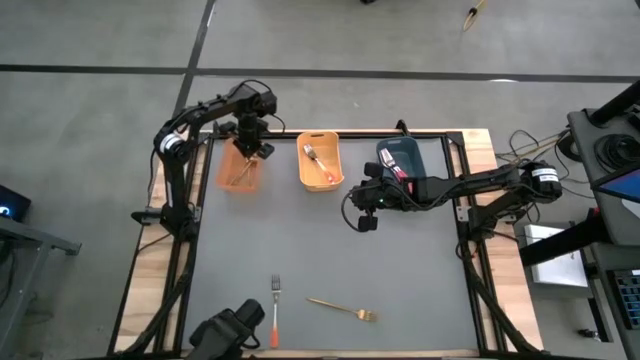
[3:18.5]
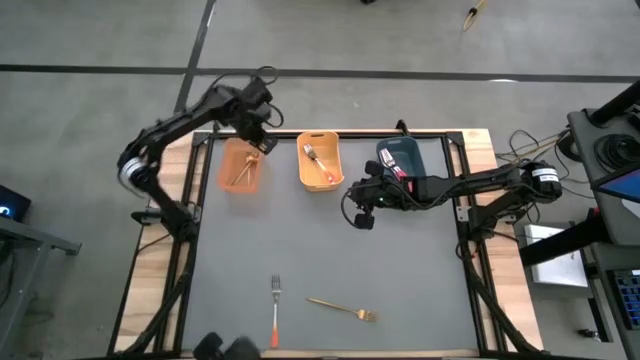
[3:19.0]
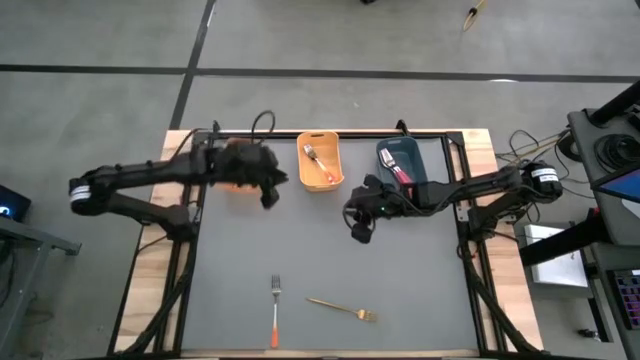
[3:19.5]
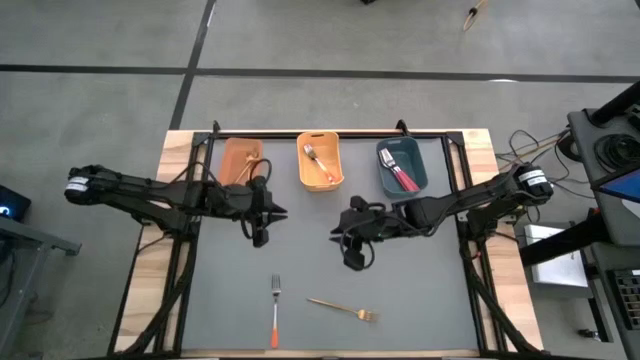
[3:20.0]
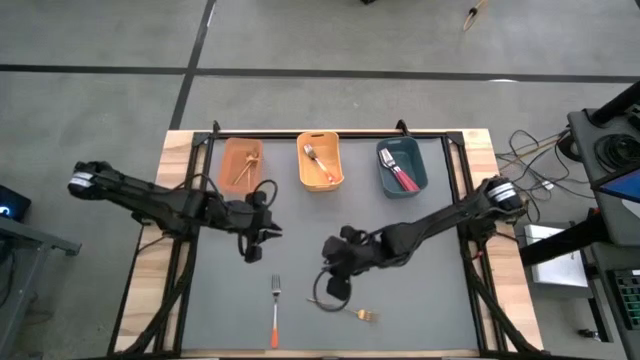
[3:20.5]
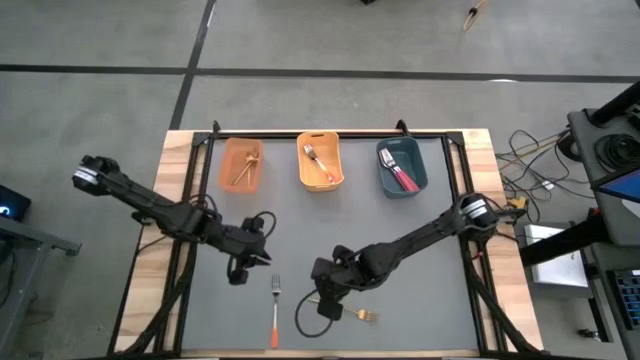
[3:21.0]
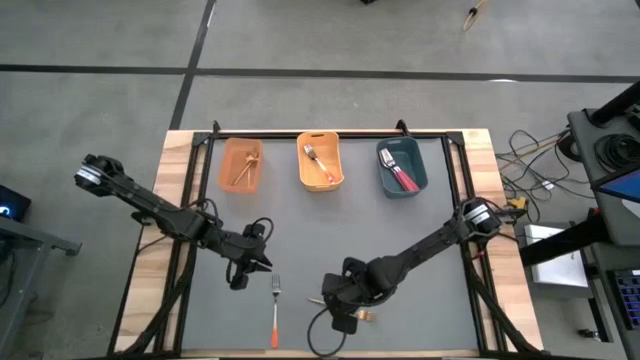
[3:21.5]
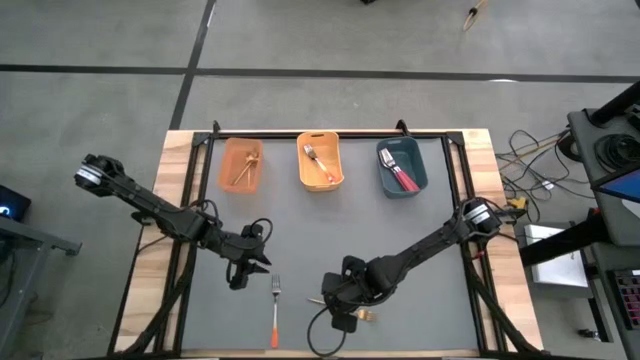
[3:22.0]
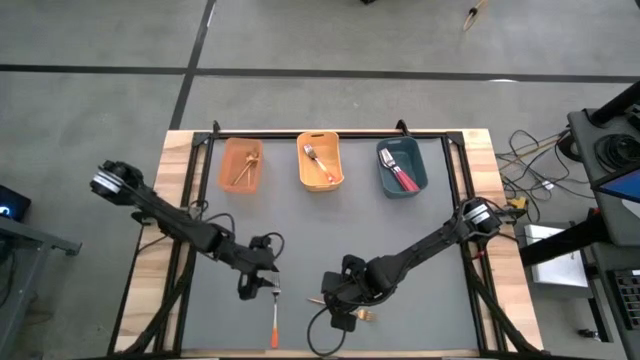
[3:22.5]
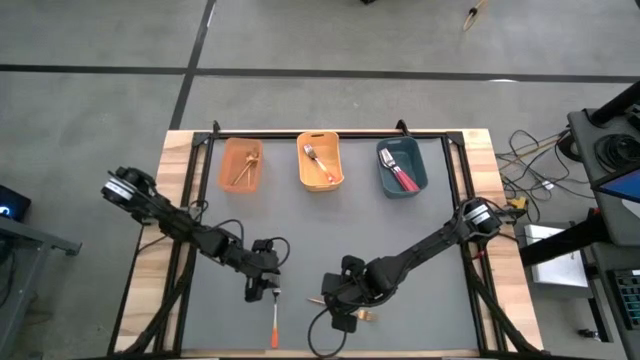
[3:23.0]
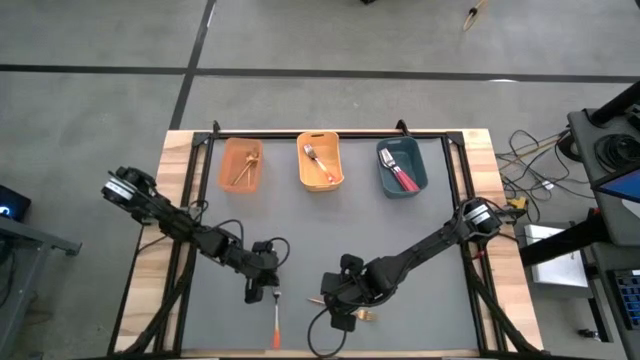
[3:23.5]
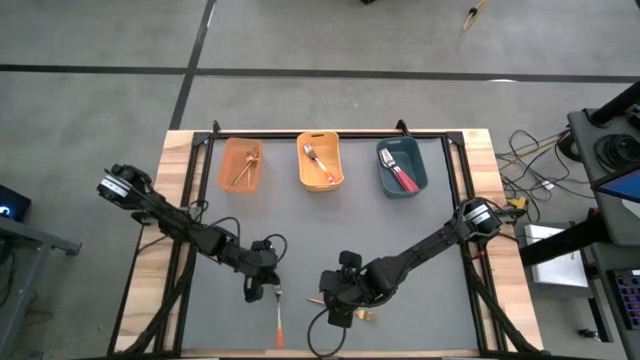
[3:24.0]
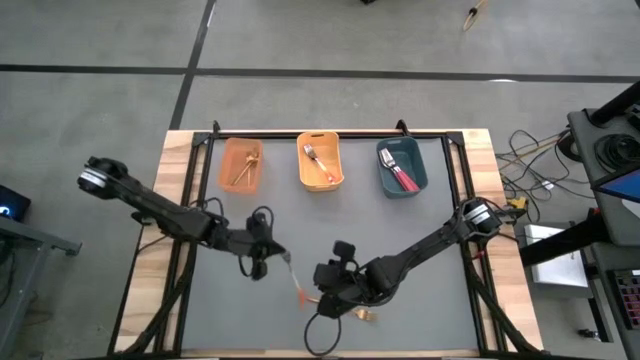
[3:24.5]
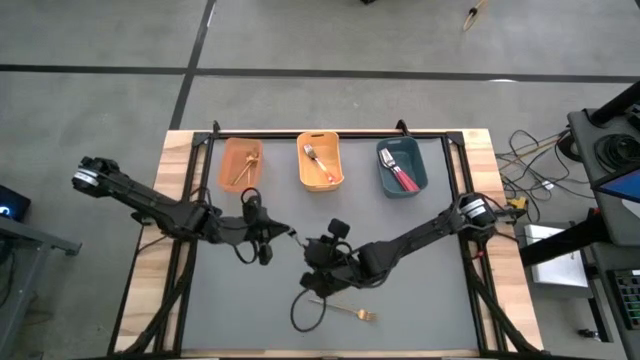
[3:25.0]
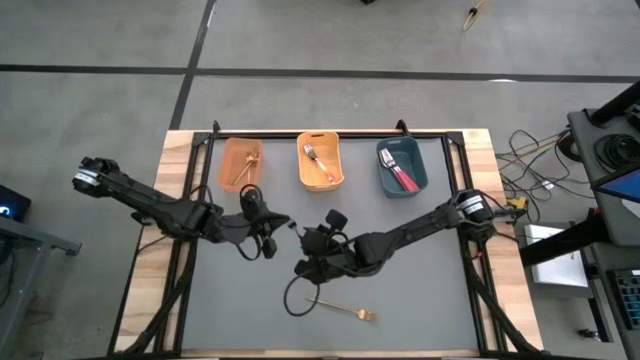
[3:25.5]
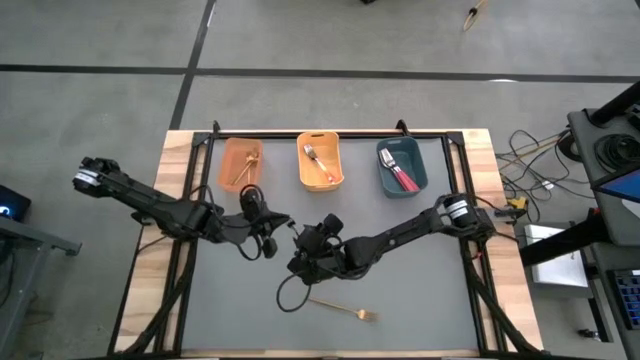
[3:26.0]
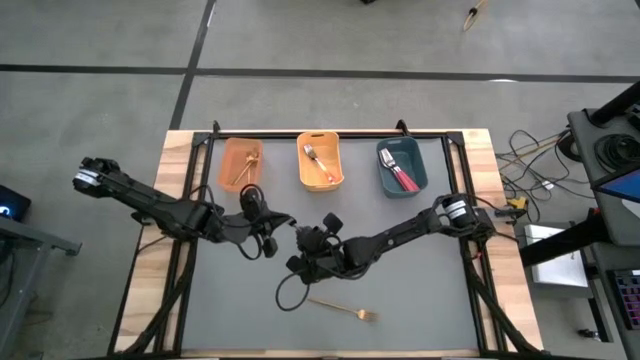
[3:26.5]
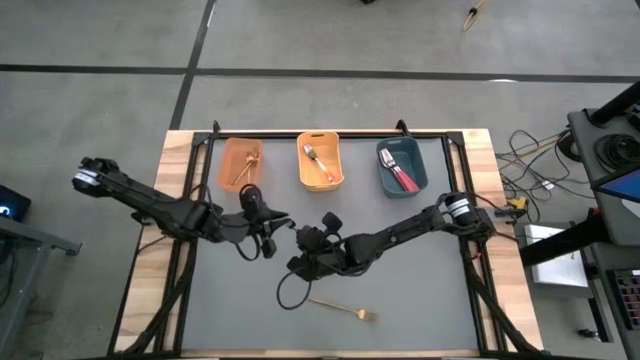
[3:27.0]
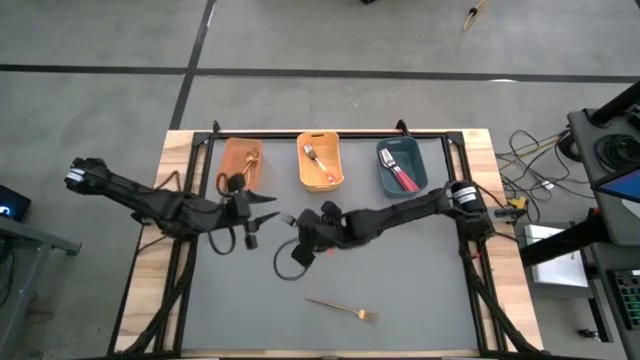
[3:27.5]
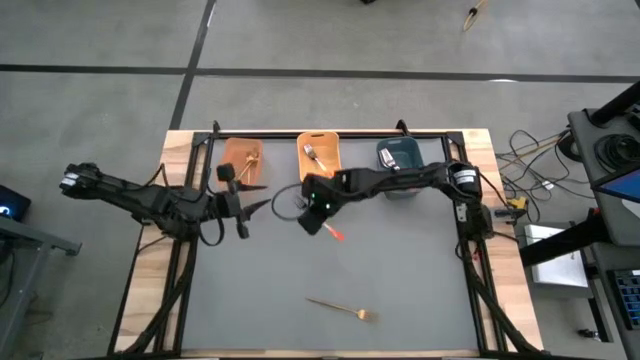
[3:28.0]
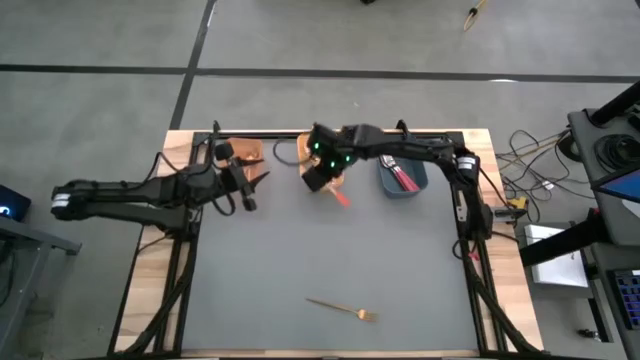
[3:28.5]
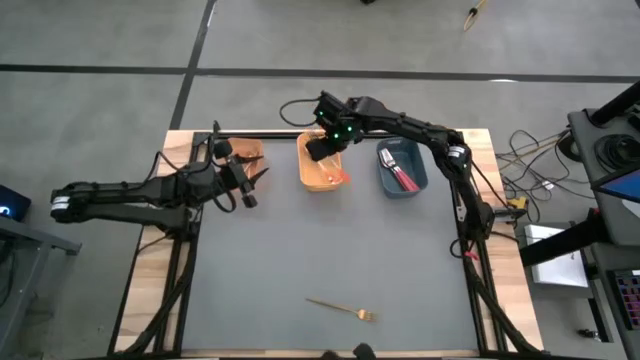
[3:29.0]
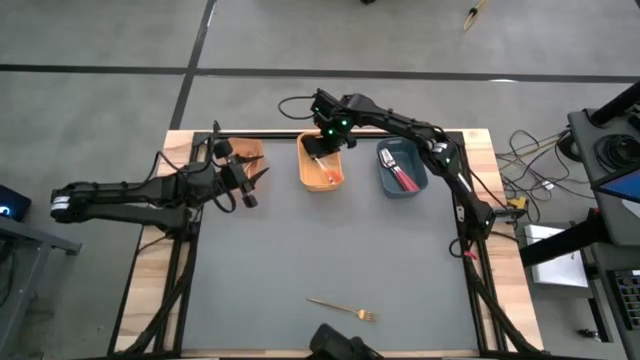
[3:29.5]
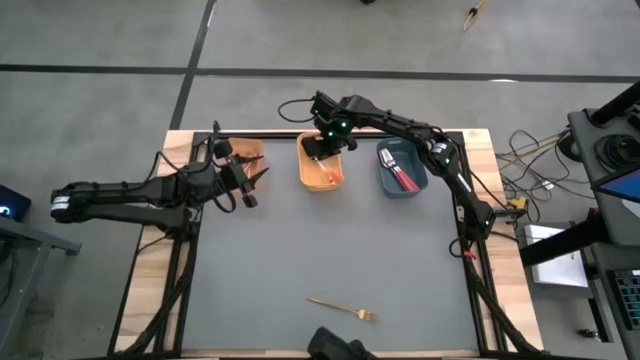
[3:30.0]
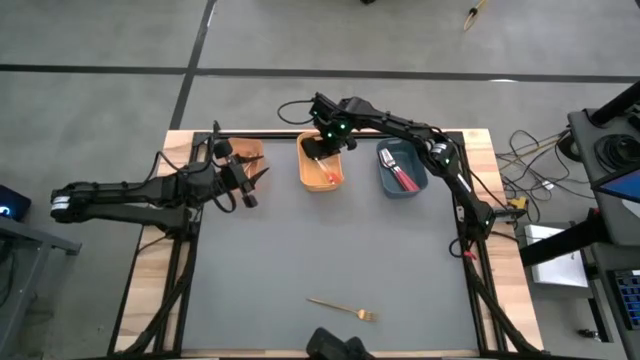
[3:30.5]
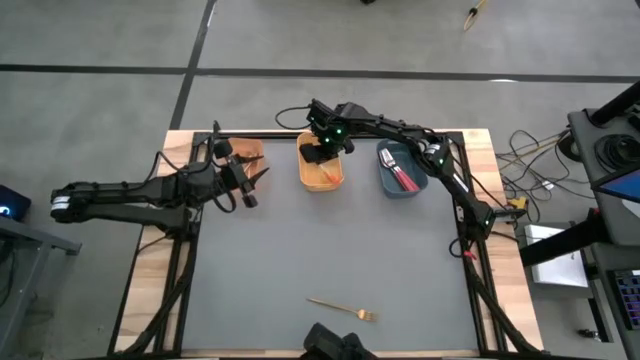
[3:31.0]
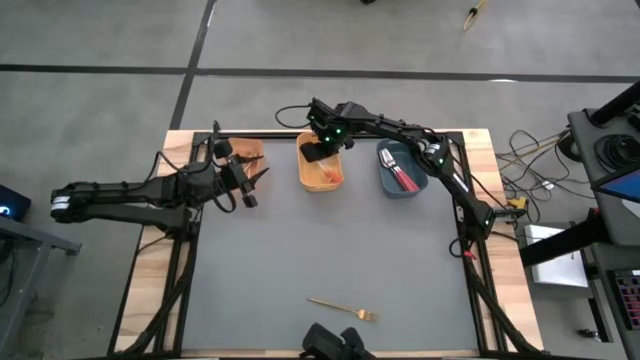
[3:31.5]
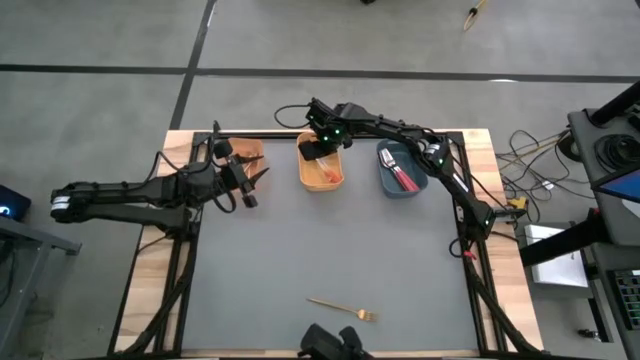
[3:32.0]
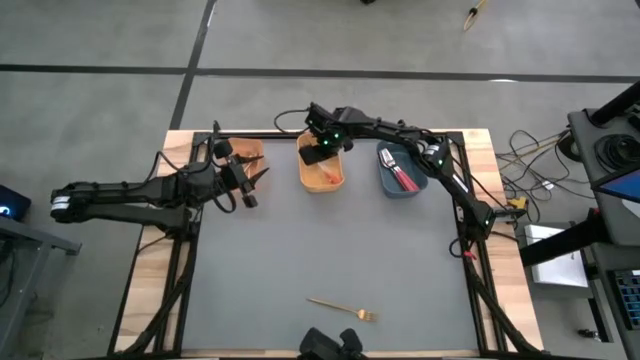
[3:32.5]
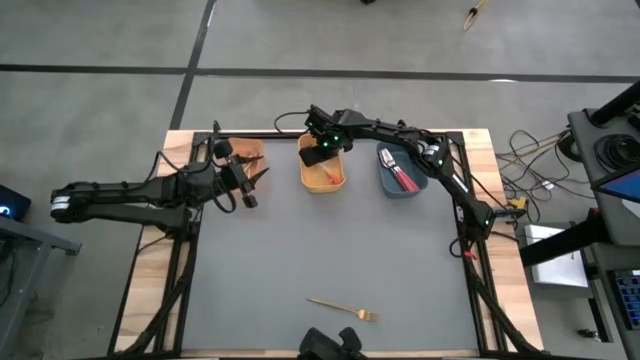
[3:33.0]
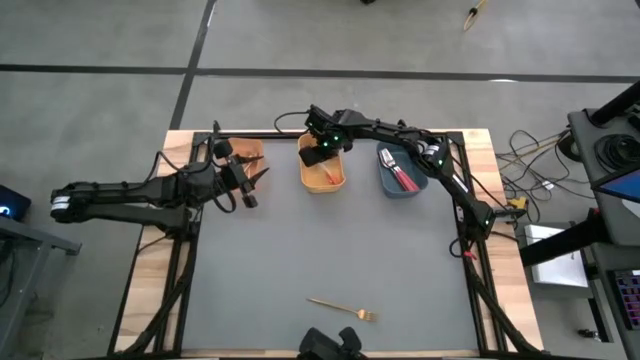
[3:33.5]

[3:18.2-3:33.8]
Task: Sort silverware by color (type)
Put the orange fork into the yellow bin

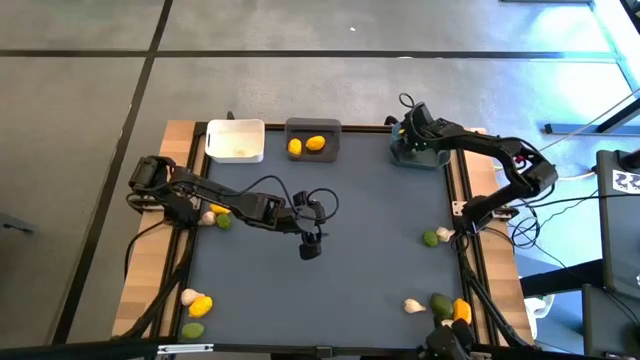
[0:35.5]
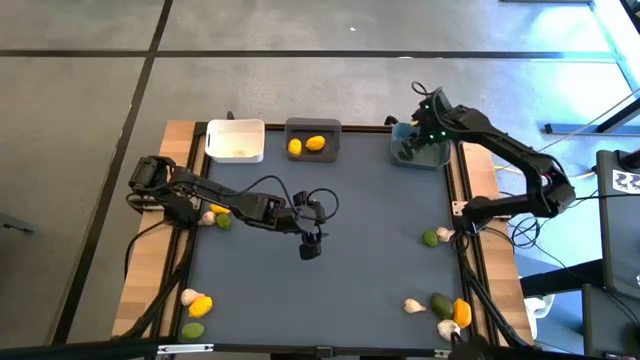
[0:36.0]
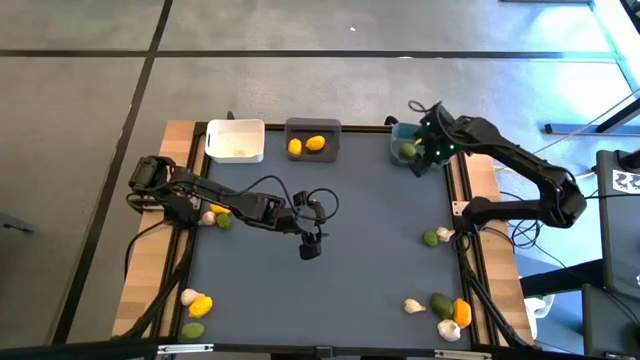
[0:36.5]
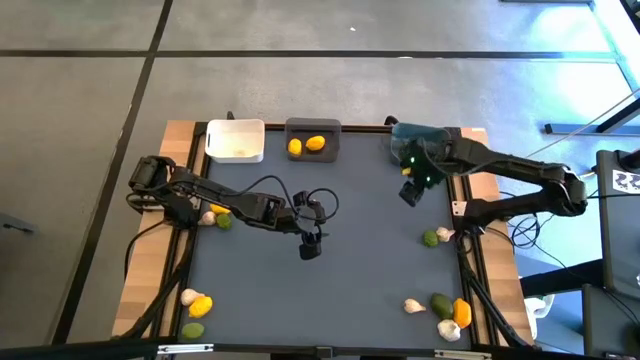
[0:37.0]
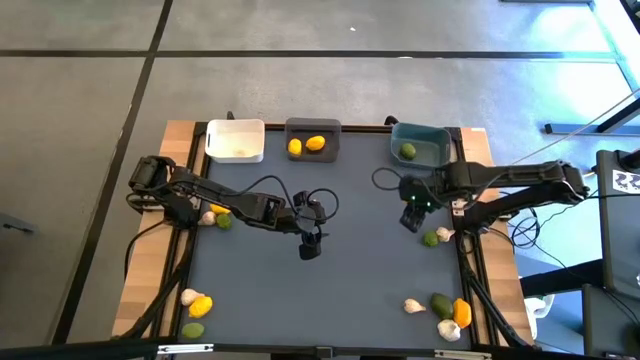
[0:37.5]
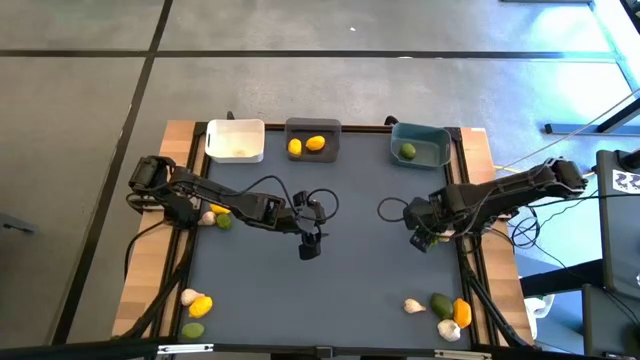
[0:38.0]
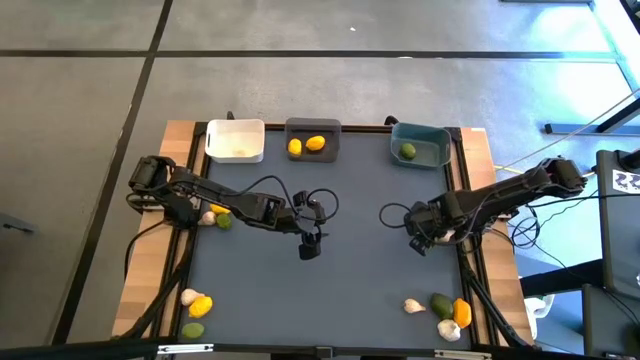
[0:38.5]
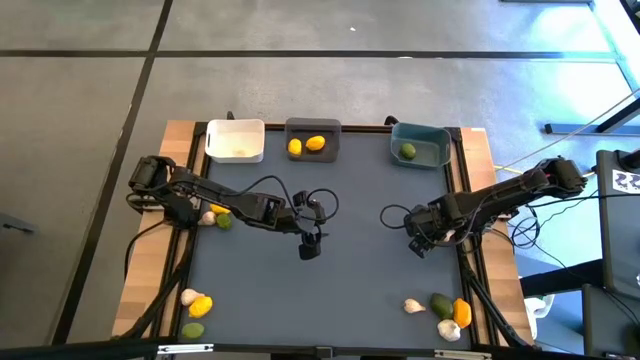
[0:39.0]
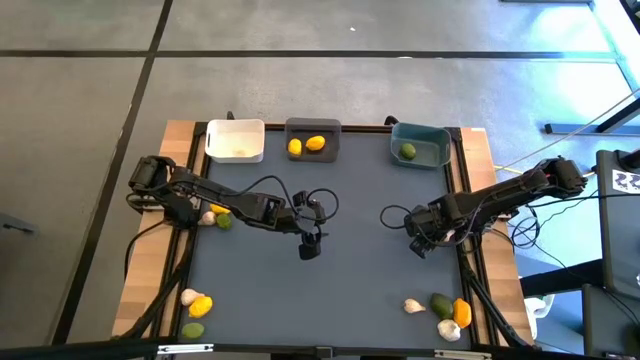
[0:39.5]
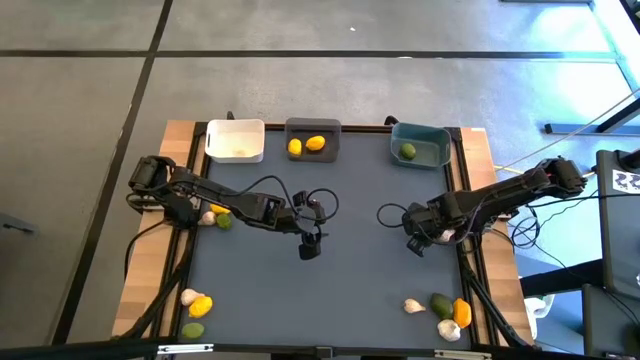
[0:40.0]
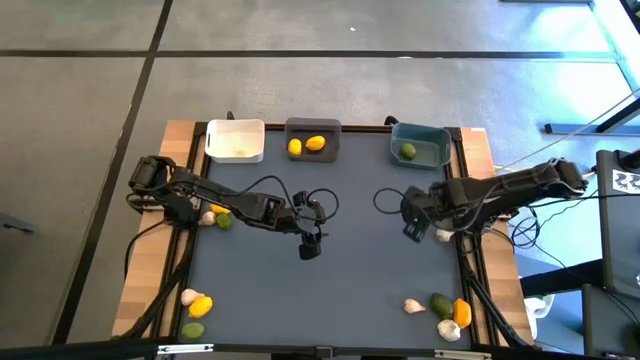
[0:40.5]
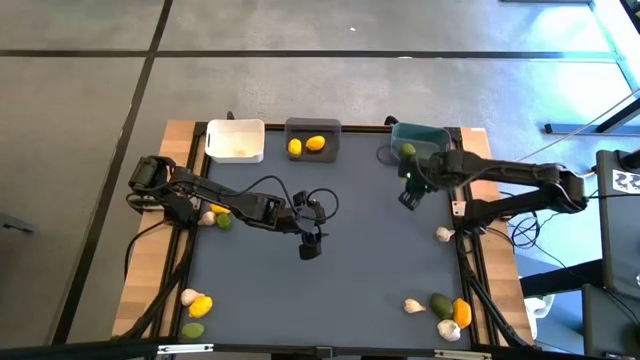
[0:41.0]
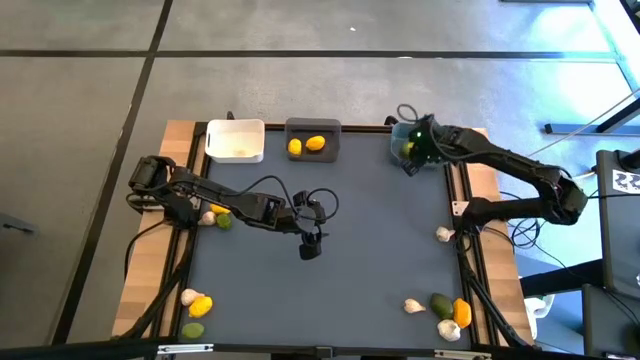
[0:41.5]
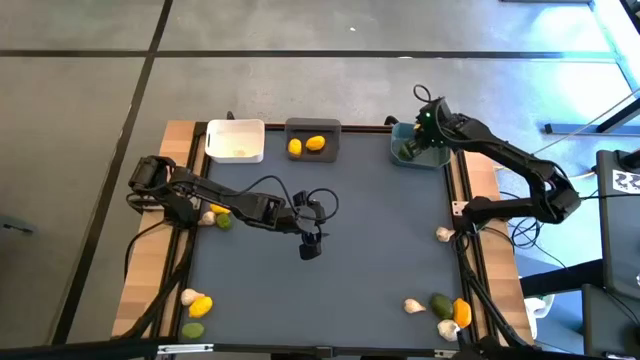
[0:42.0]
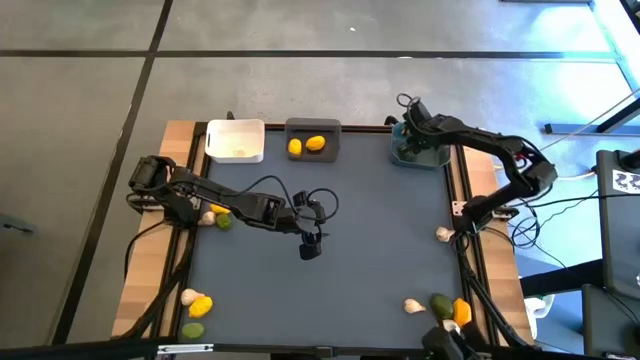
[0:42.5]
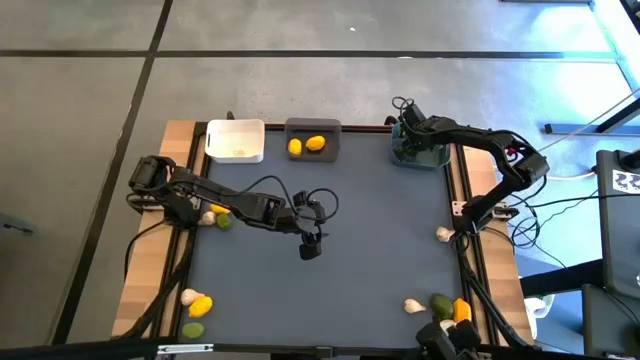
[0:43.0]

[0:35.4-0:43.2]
Task: Sort produce into baskets
Put the lime into the blue bin
